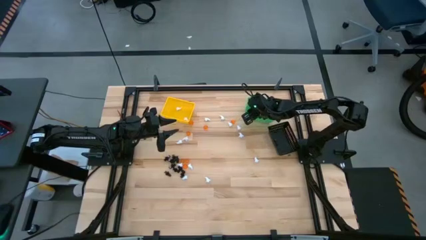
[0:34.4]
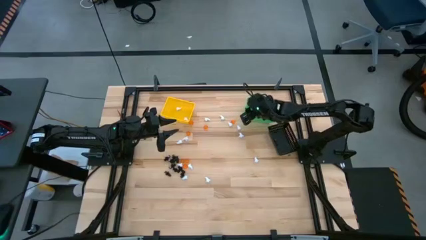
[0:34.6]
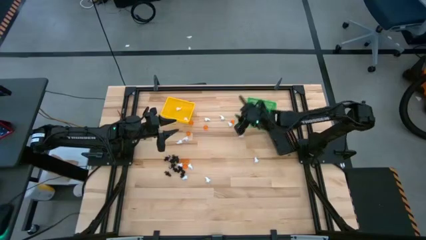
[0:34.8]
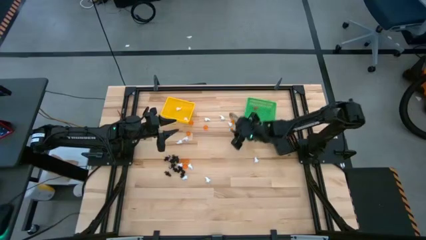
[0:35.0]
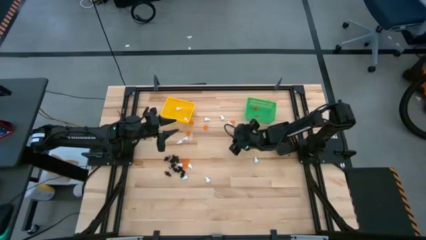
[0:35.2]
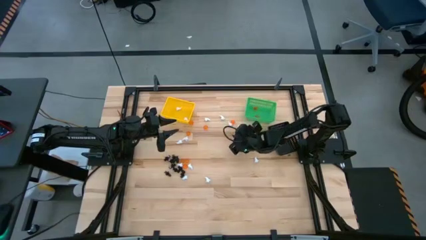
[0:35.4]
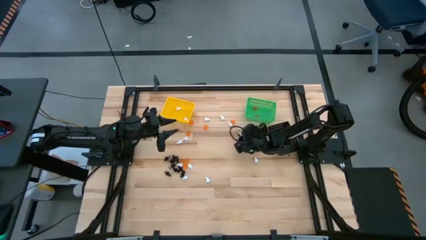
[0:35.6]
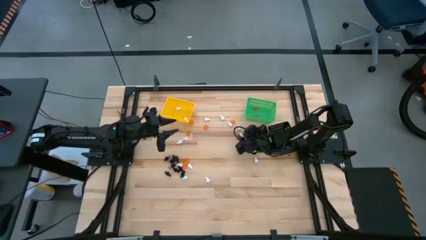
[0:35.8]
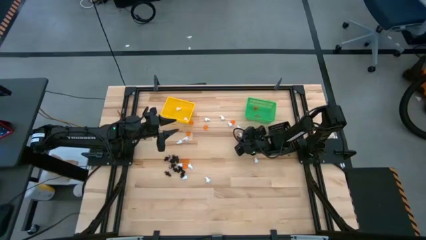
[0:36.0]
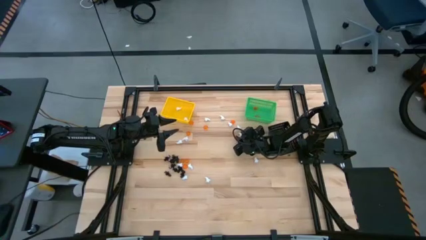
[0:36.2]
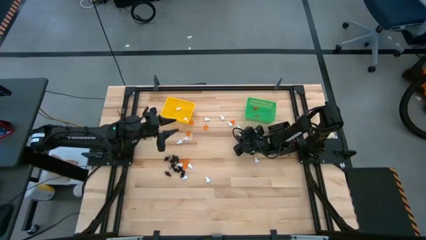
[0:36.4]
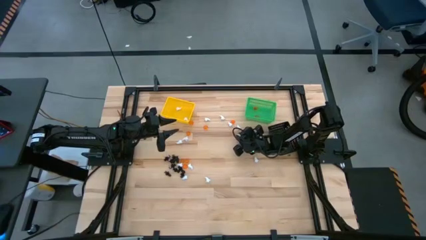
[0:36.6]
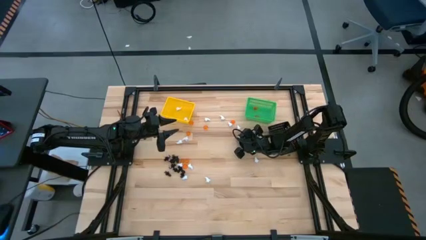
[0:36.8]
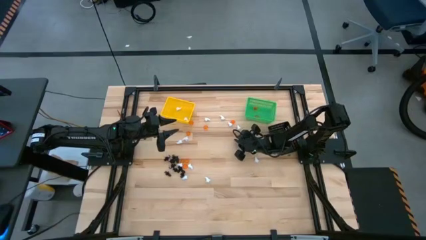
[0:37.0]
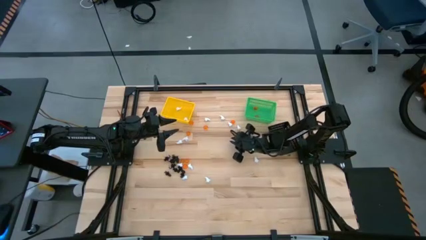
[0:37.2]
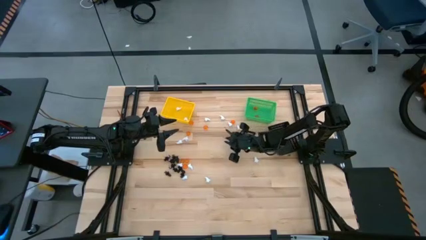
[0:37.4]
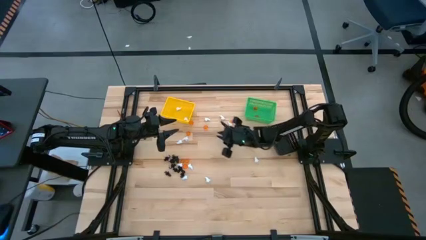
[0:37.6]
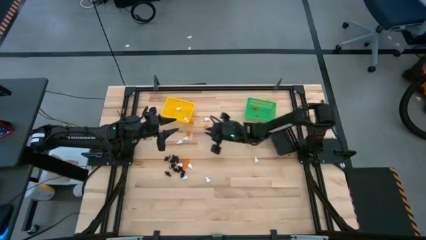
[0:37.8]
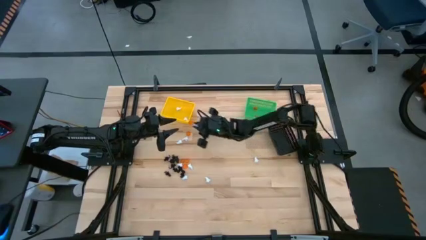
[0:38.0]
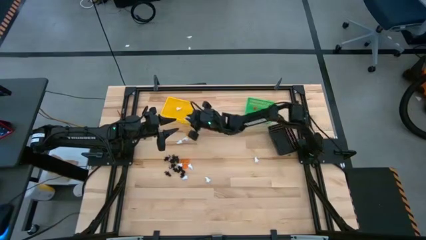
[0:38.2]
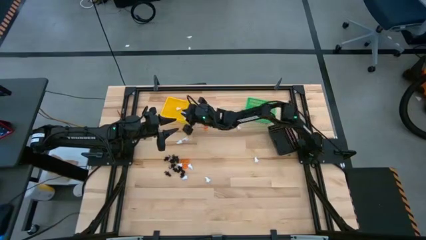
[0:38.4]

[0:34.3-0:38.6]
Task: Sort Halloween decoration
Put the white ghost toy into the yellow bin

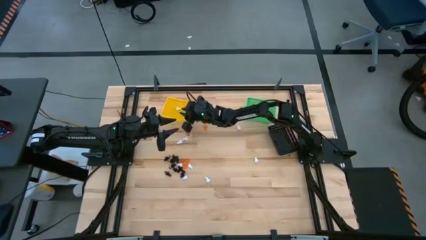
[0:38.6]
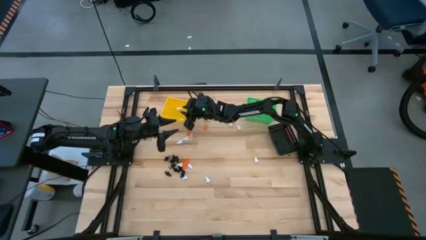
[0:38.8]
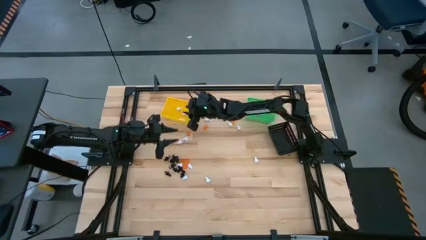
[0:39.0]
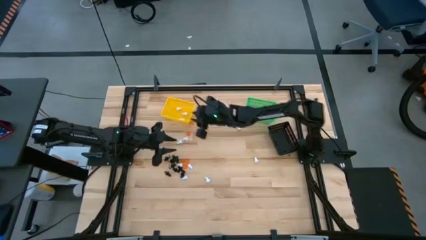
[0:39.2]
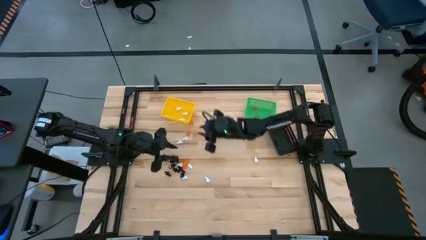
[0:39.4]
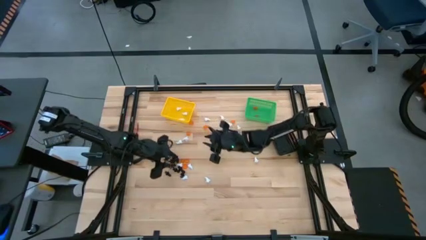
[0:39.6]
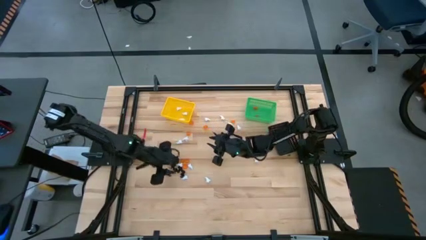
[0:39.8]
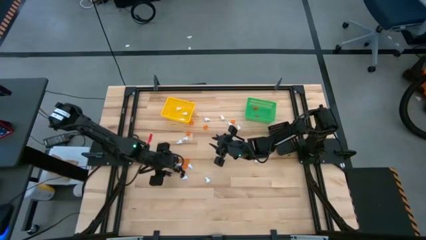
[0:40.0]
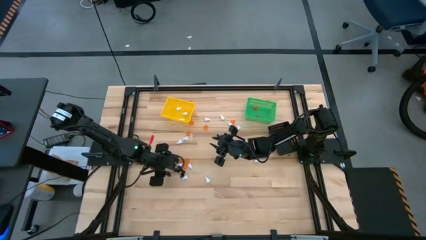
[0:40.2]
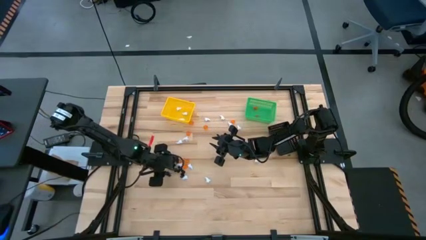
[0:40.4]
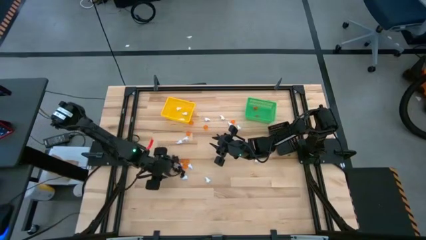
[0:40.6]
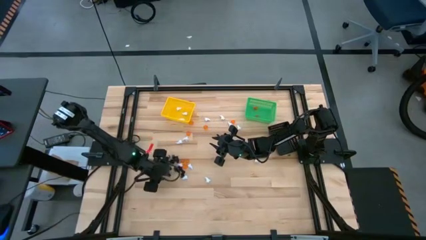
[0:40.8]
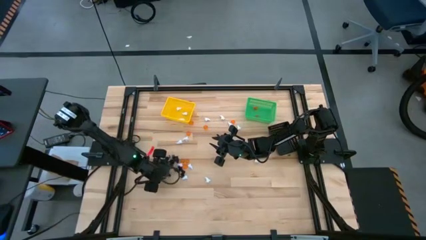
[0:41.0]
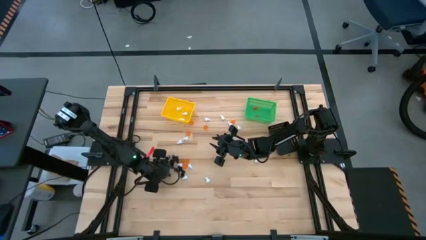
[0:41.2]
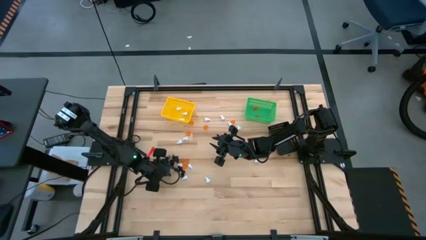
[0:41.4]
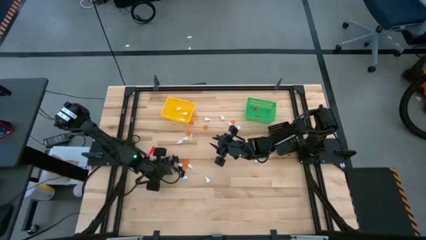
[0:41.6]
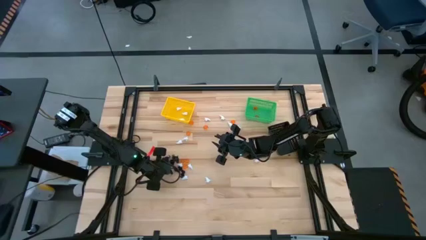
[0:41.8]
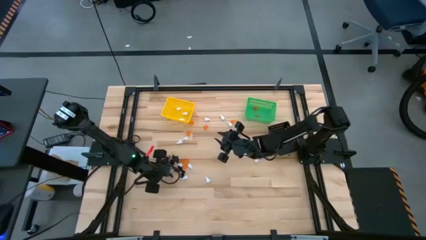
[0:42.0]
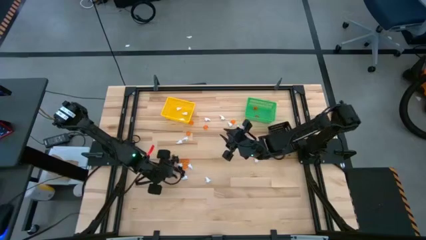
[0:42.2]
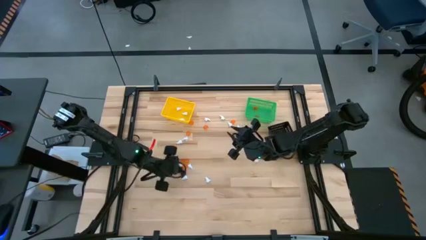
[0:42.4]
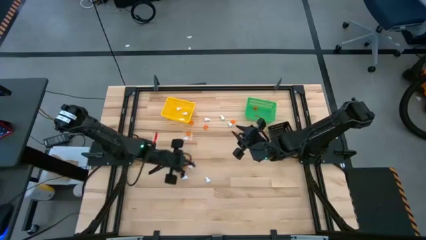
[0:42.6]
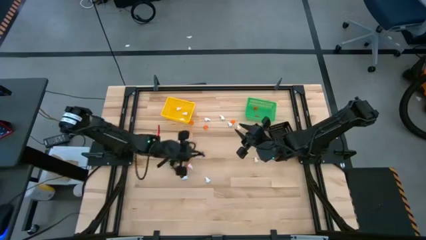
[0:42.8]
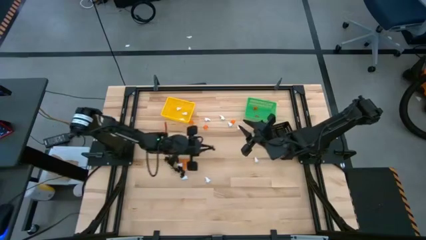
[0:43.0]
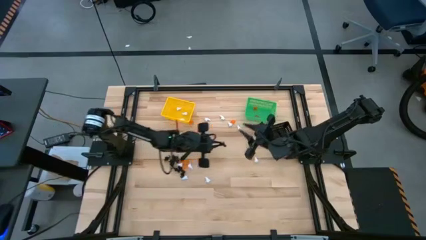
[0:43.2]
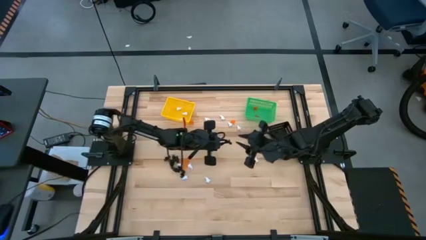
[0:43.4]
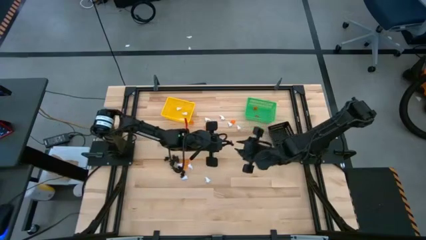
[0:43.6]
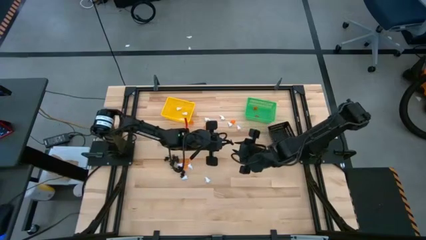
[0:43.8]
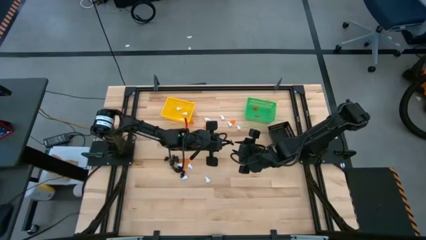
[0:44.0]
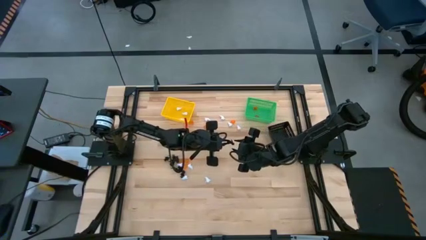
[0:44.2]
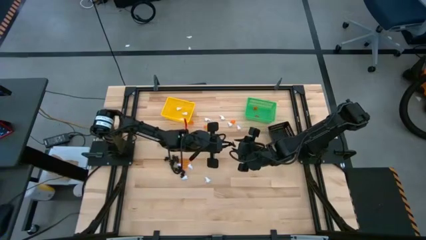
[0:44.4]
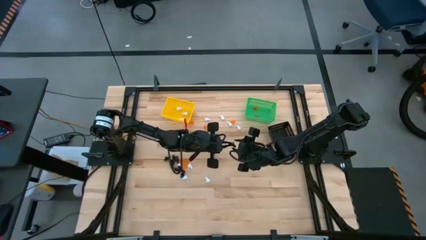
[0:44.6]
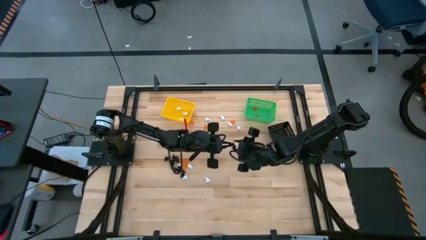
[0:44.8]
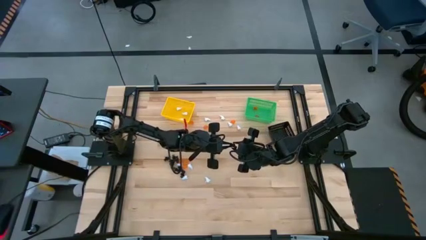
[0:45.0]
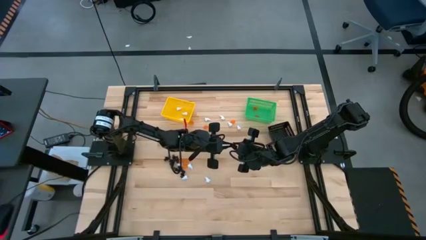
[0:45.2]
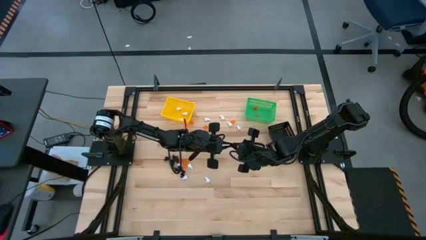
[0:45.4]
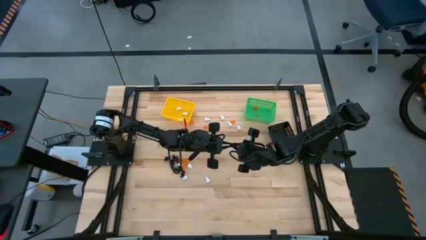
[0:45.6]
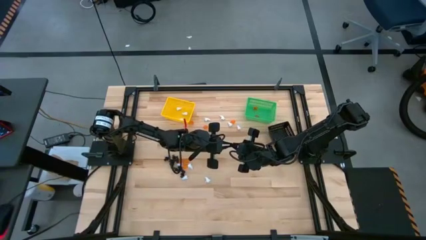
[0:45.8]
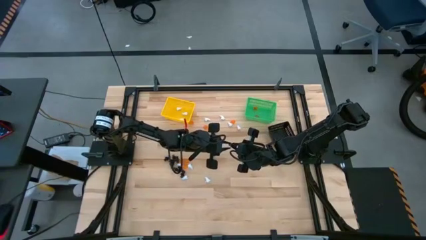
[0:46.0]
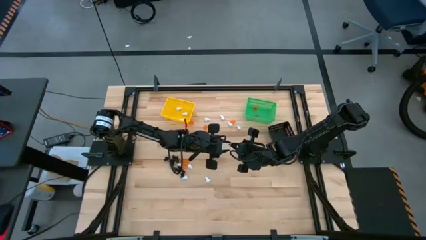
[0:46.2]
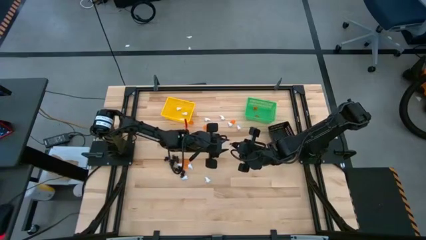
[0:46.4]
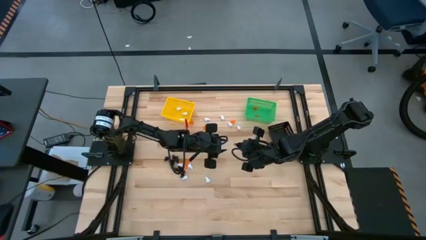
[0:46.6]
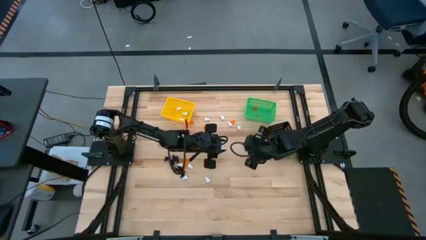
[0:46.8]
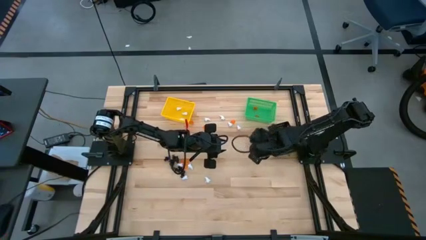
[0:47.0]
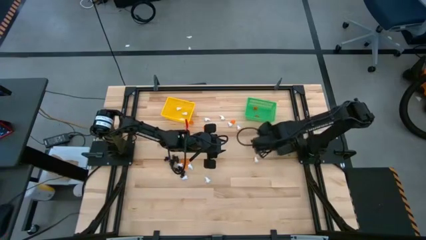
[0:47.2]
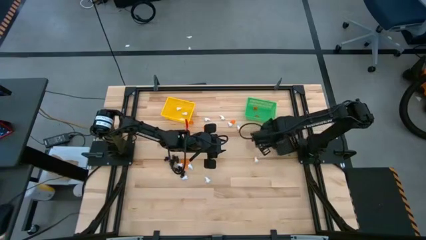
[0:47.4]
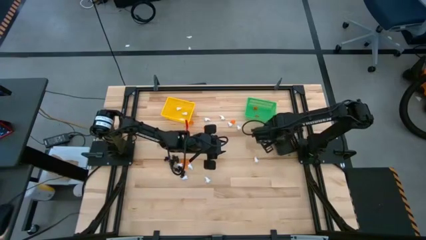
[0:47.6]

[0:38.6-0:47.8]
Put the black skeleton toy into the black bin

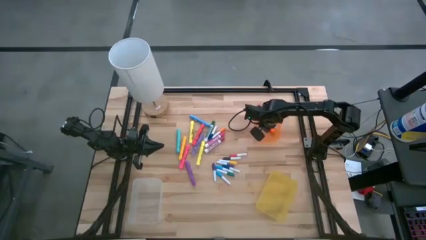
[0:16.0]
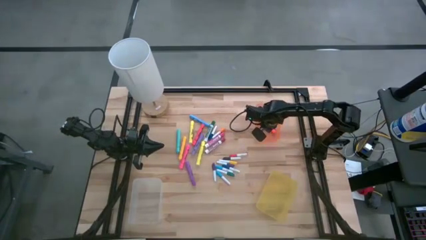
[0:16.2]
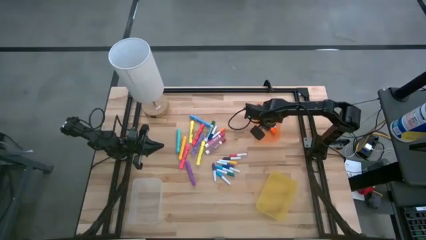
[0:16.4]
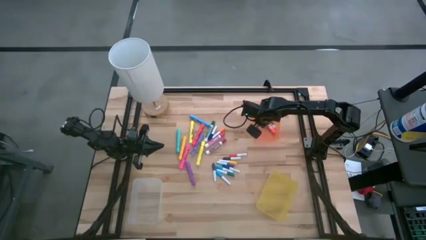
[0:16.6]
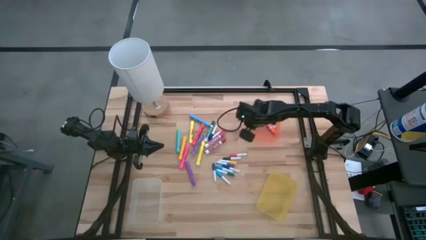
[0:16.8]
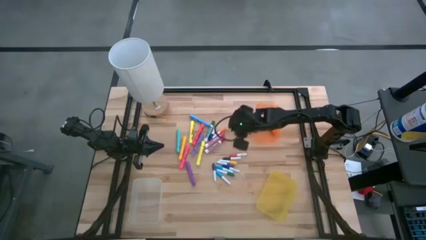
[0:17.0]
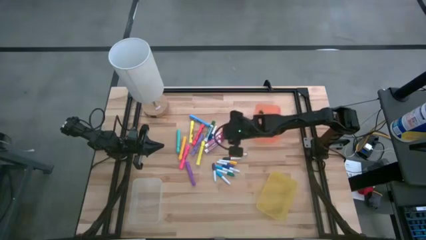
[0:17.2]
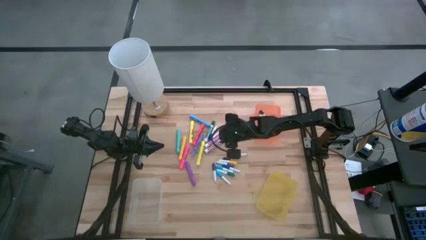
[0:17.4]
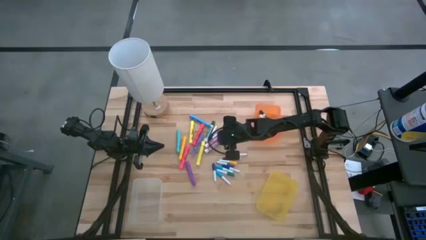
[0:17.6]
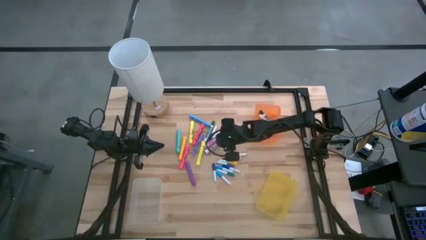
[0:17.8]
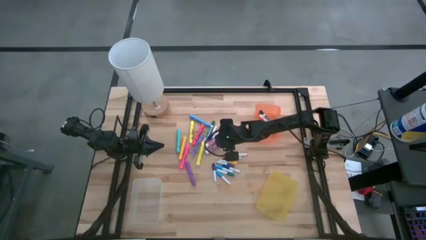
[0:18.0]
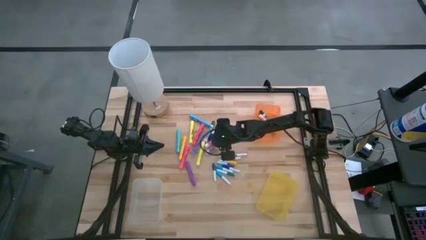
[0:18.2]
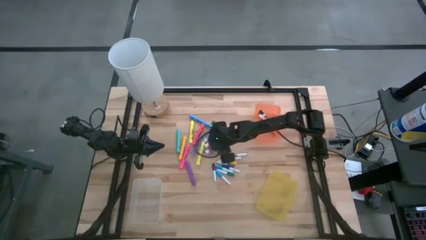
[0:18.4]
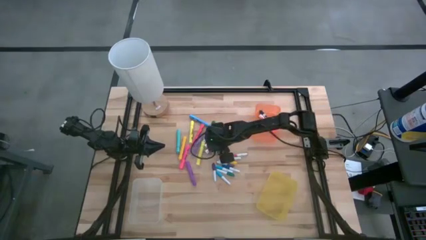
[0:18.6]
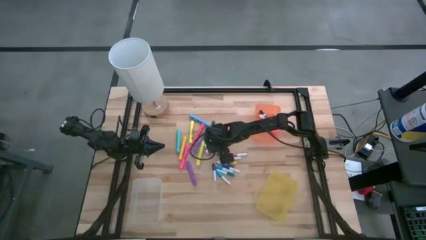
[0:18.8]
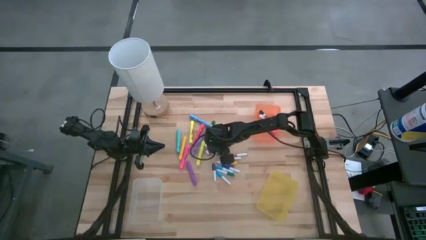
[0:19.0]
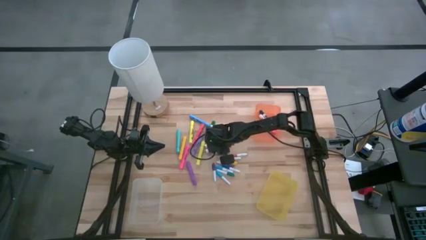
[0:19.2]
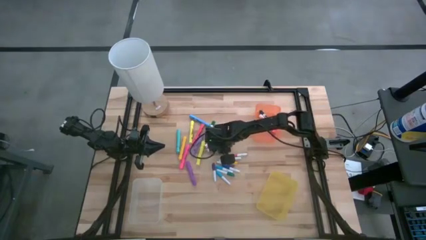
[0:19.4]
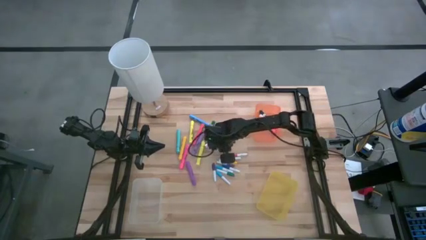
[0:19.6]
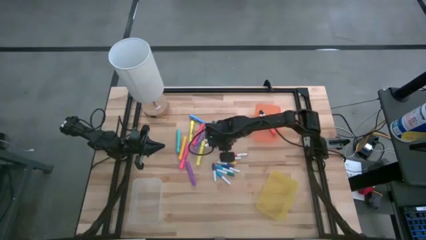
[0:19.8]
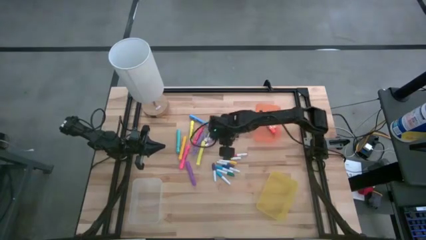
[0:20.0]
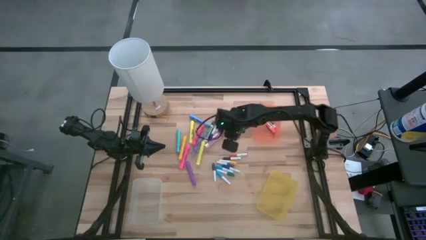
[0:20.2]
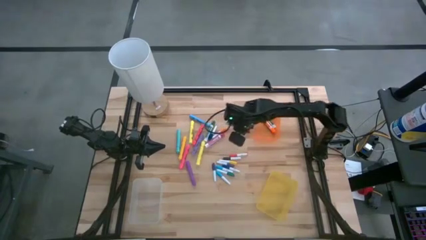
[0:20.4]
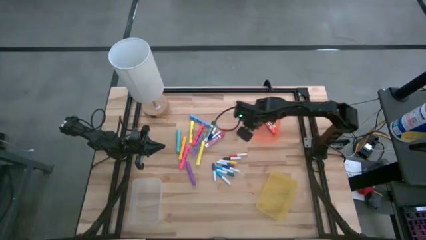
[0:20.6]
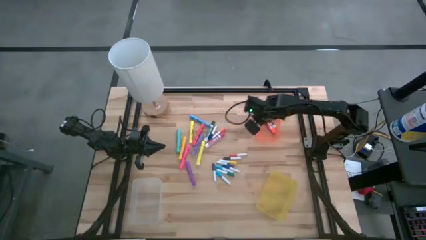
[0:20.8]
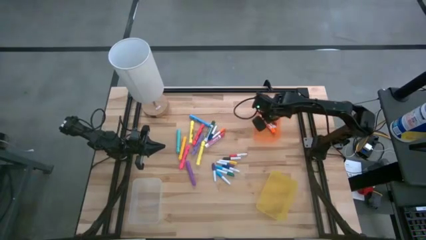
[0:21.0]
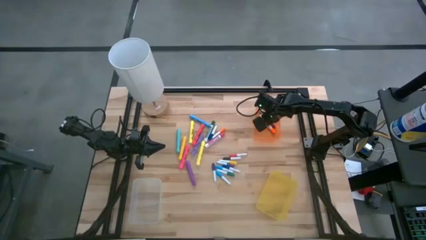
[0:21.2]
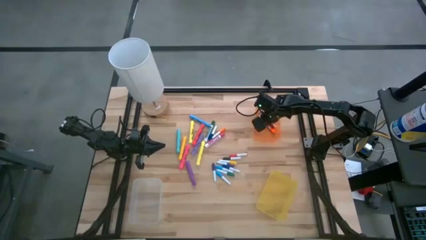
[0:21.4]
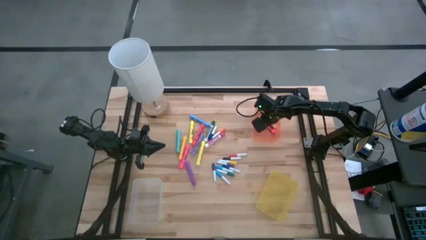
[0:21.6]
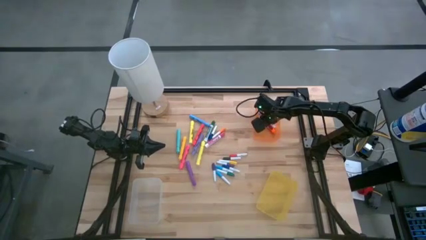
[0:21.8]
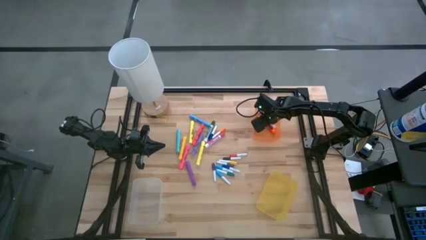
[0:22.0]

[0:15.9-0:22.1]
Task: Pick & Place Markers
Put the red eraser marker into the orange bin
